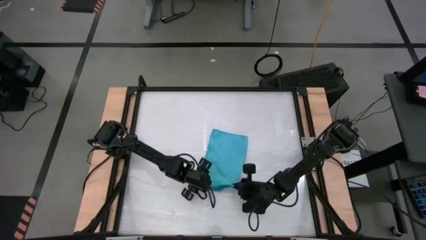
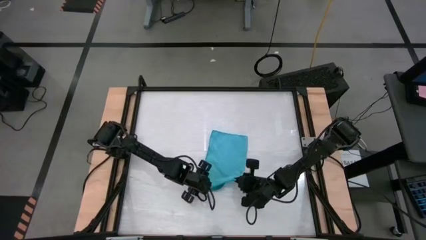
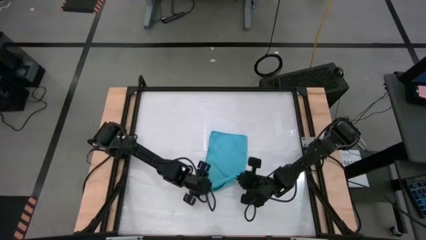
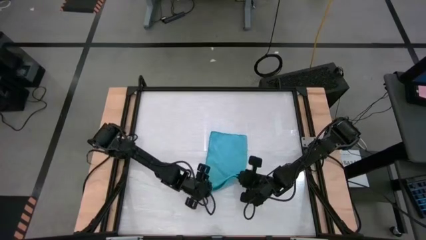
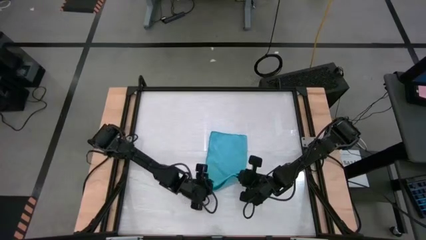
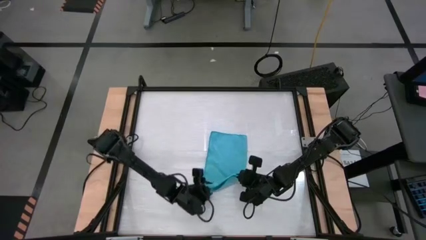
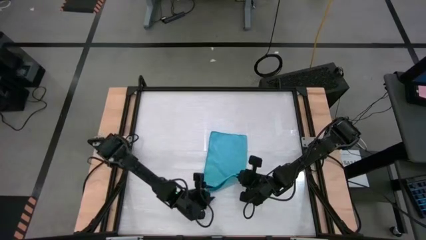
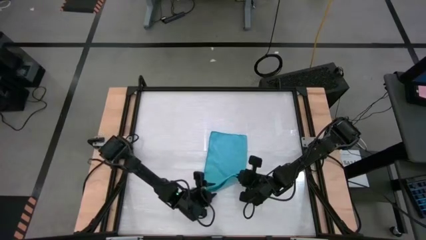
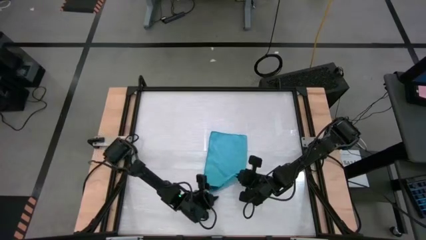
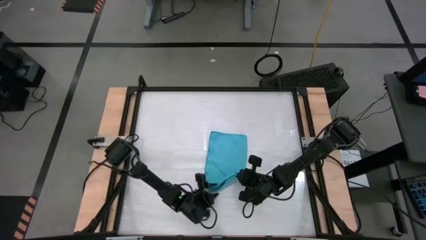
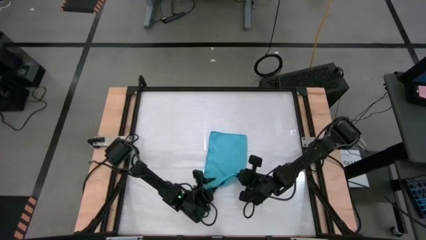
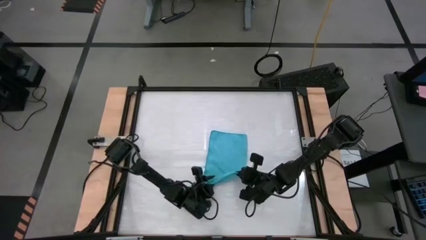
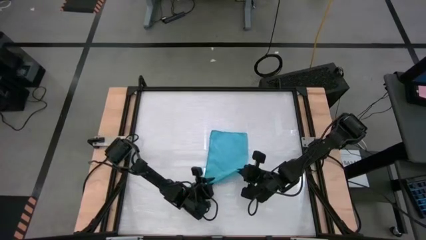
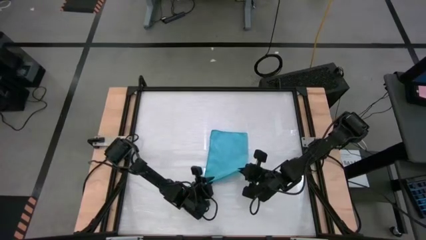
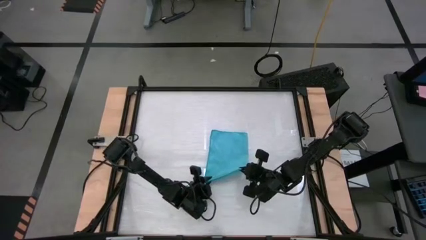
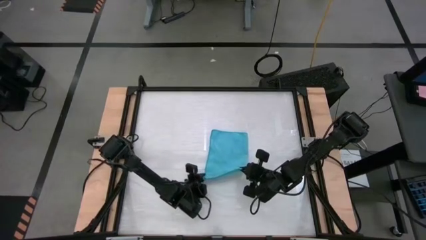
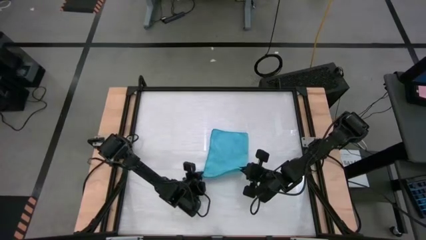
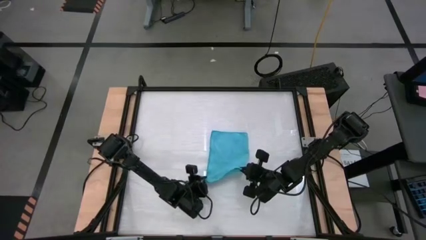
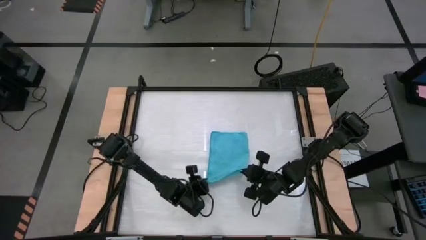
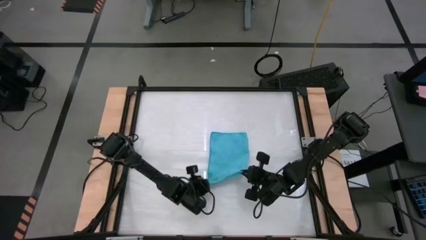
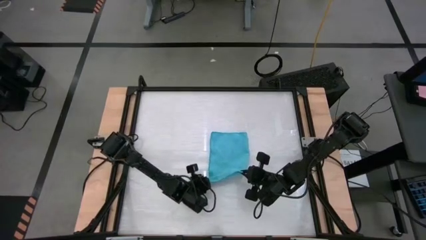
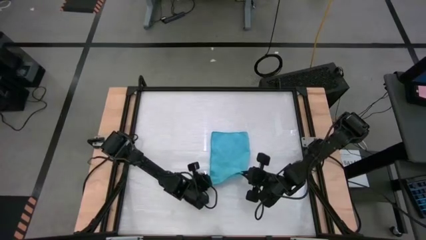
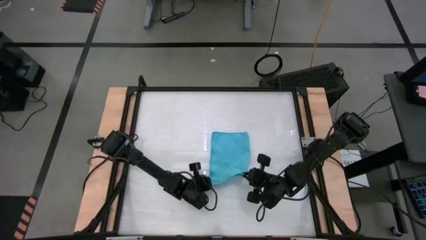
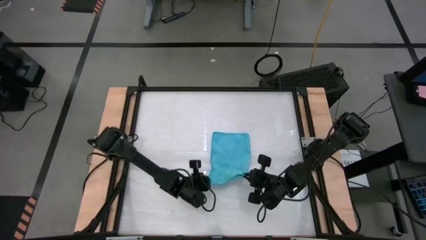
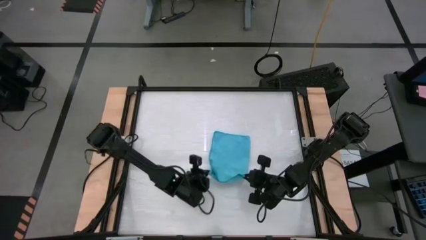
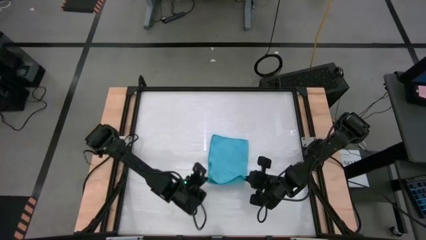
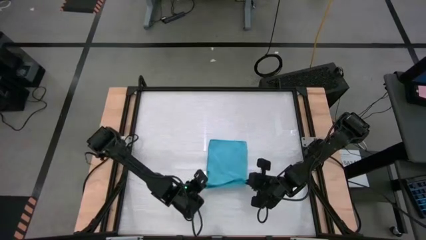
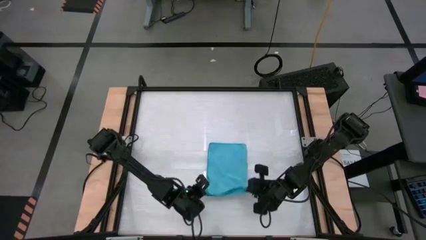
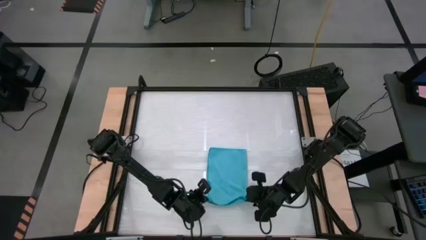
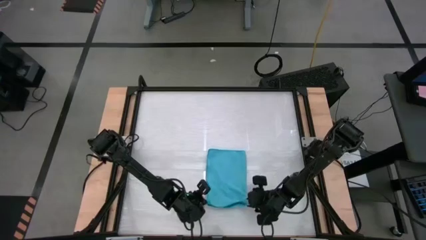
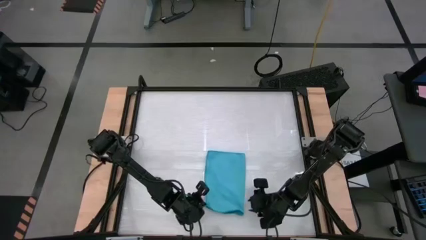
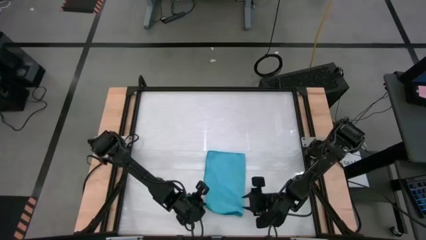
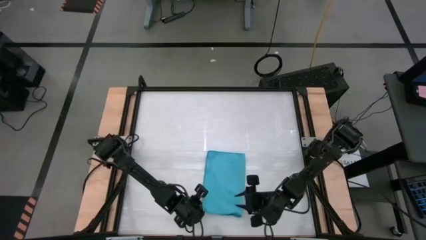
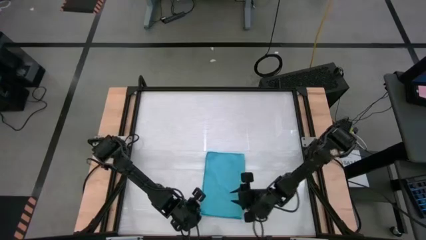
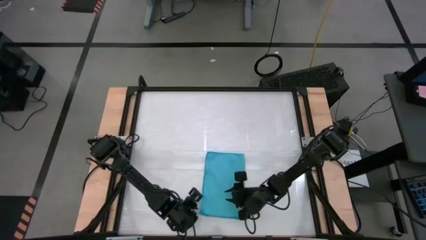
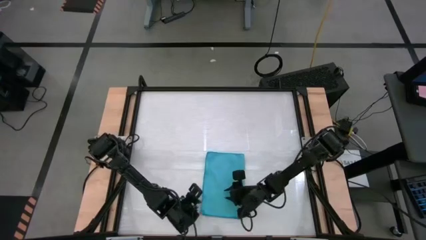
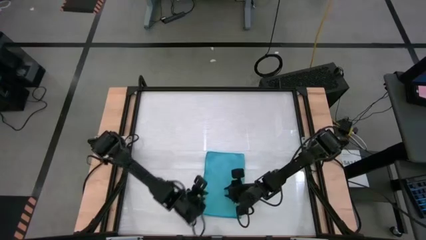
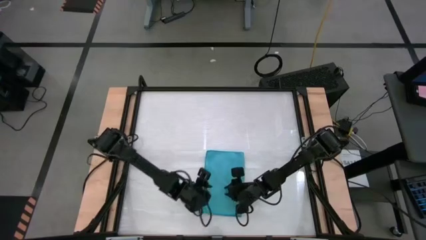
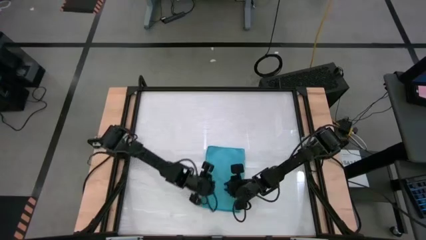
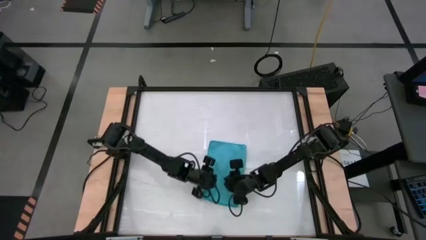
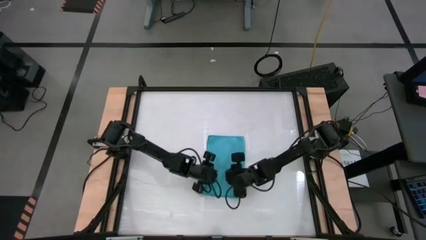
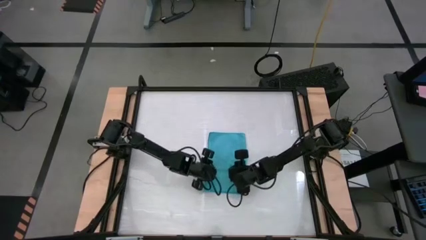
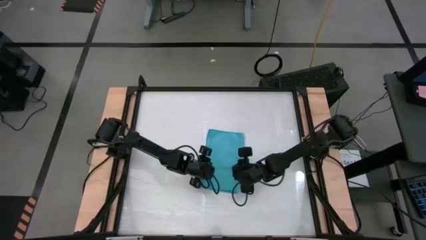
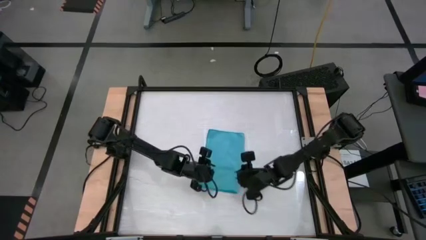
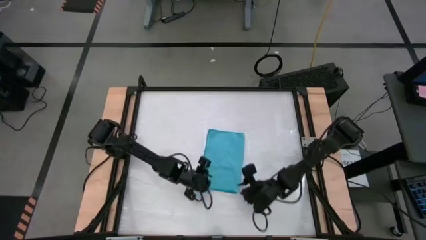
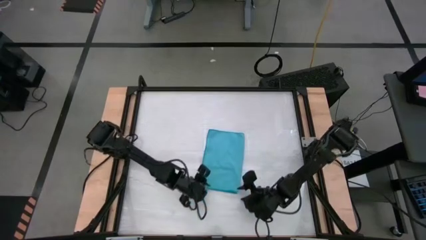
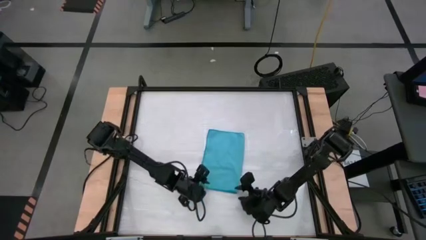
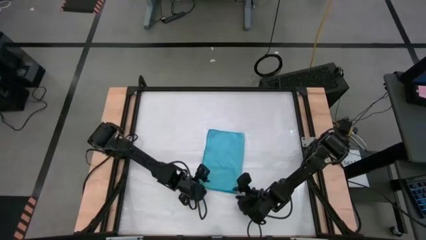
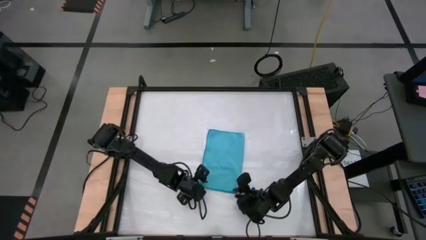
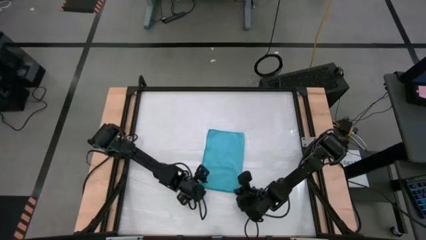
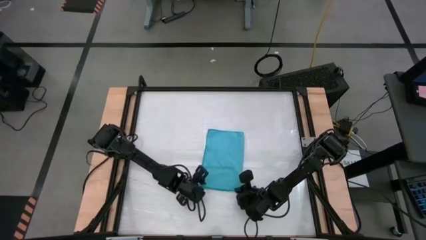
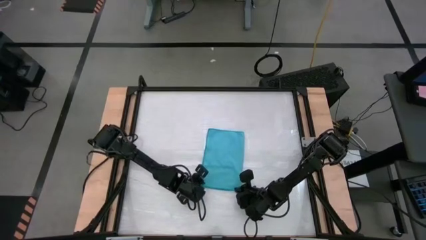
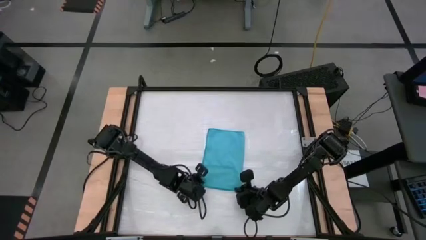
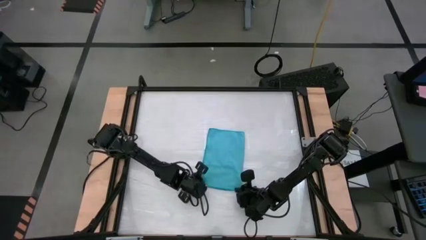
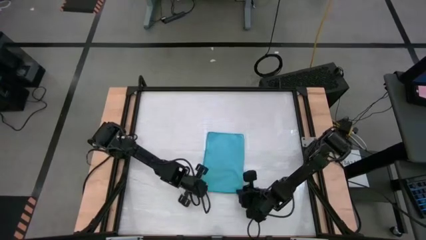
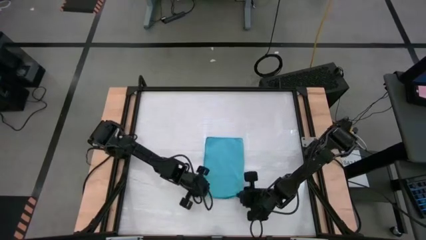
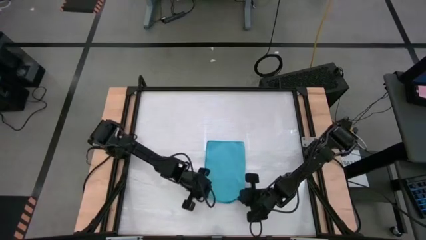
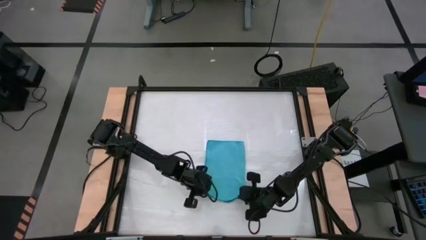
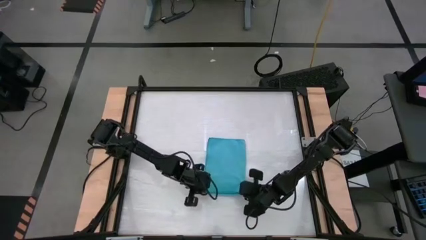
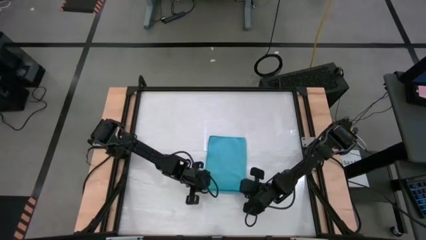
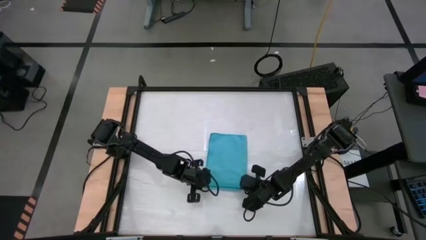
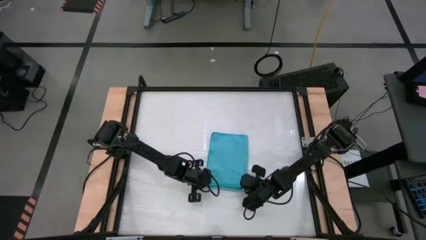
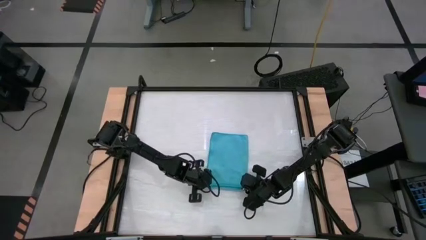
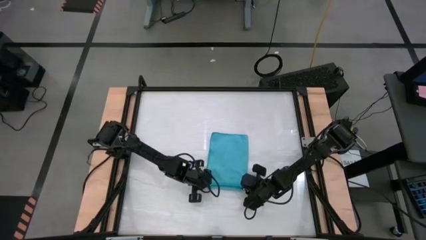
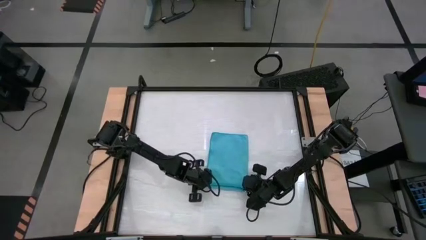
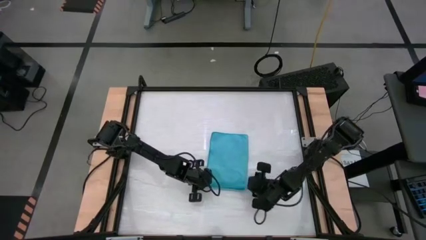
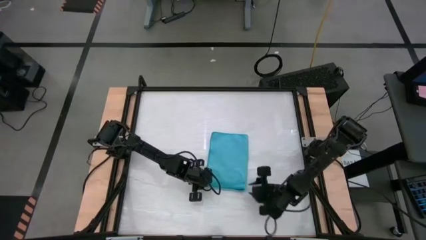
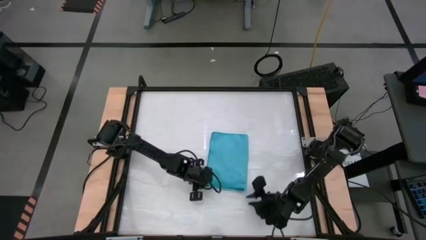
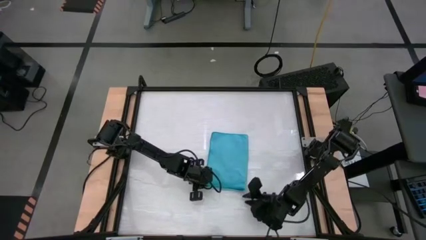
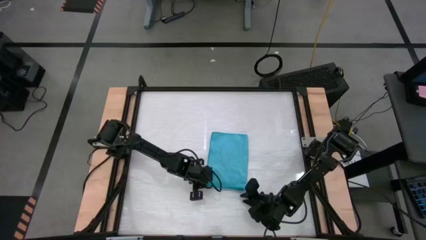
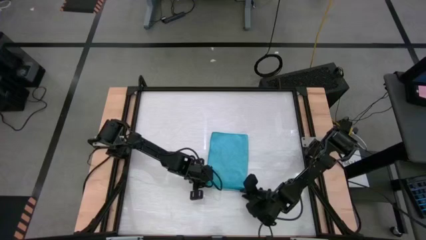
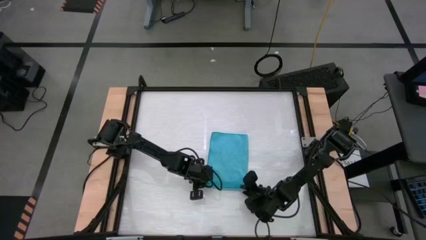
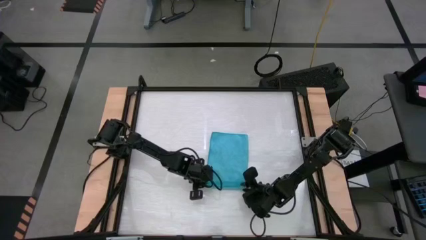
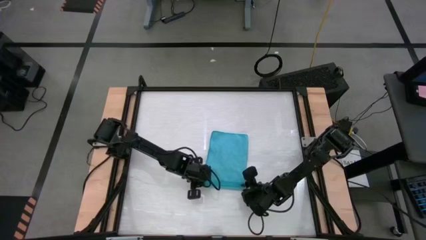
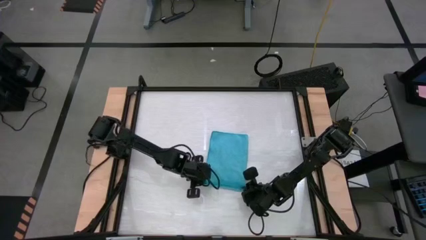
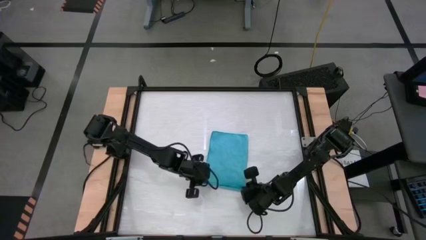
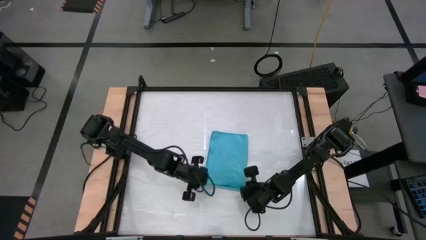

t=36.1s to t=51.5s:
Task: Roll towel
Roll the blue microfiber towel

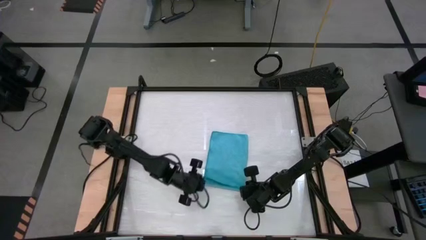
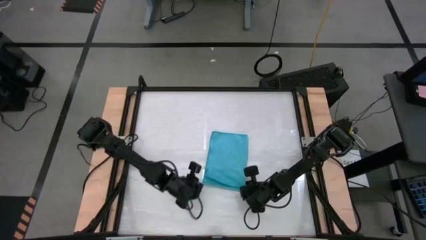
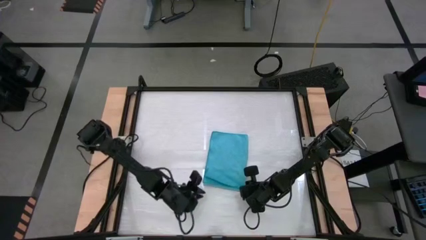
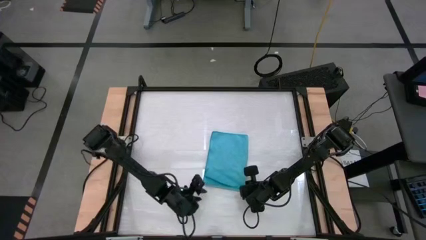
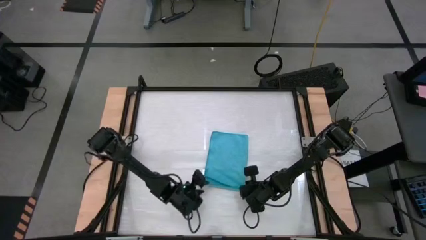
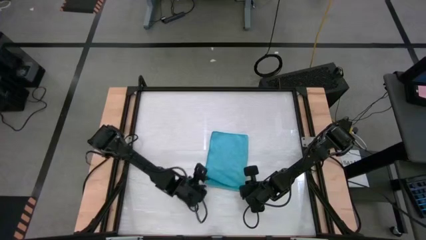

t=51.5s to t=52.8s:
Roll the blue microfiber towel
